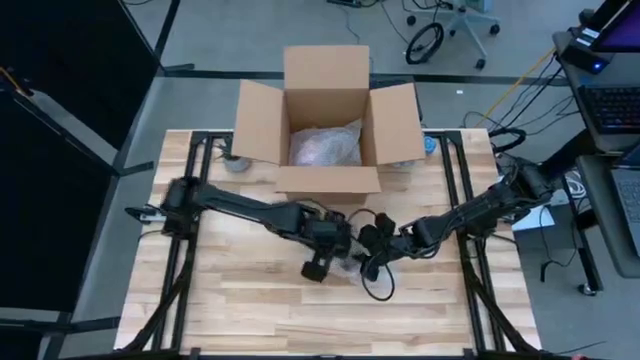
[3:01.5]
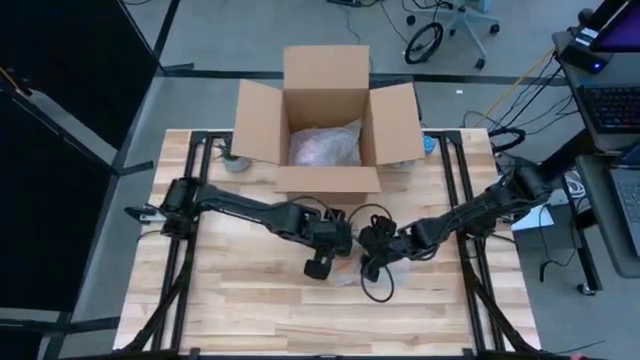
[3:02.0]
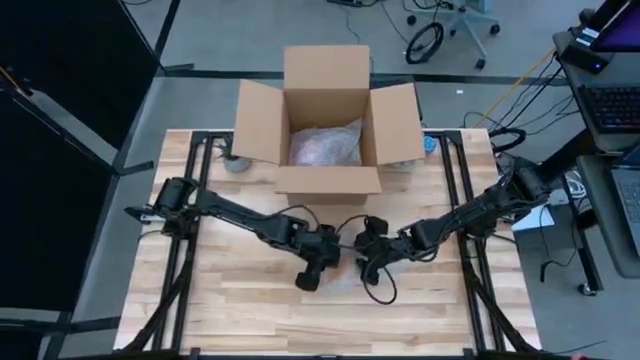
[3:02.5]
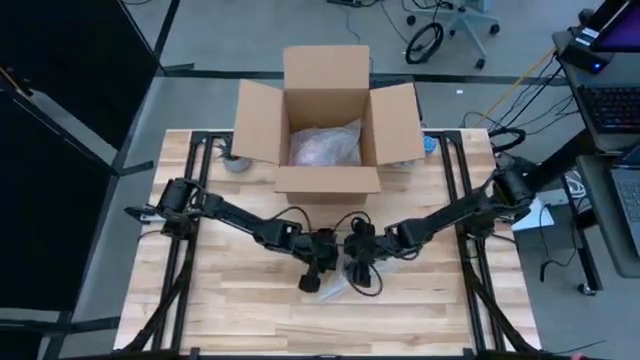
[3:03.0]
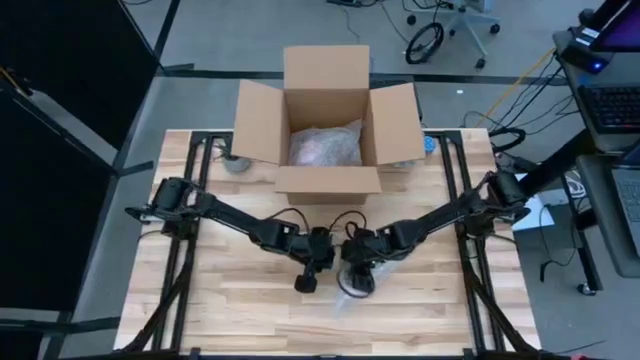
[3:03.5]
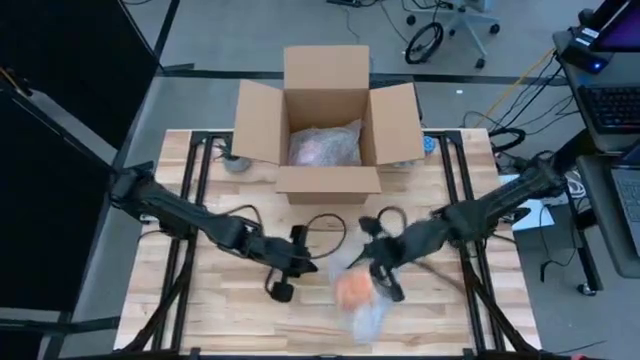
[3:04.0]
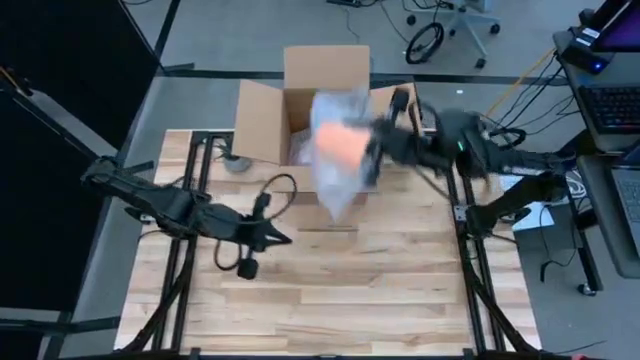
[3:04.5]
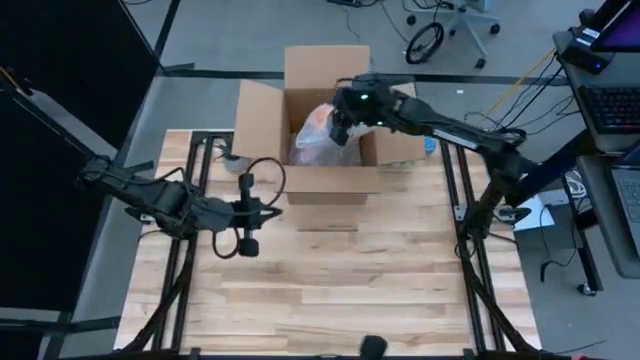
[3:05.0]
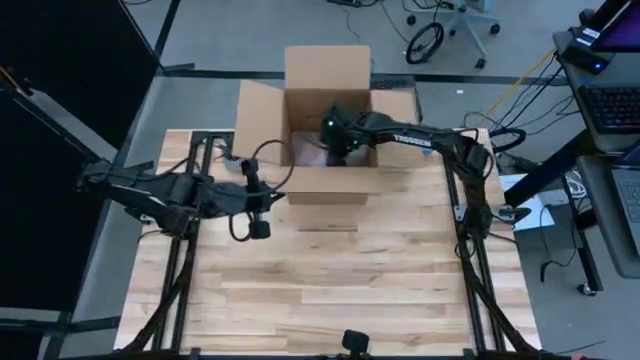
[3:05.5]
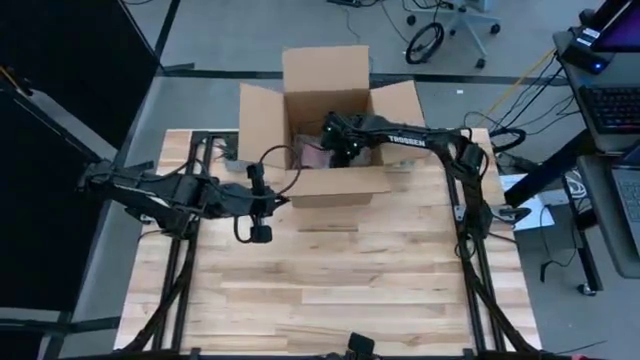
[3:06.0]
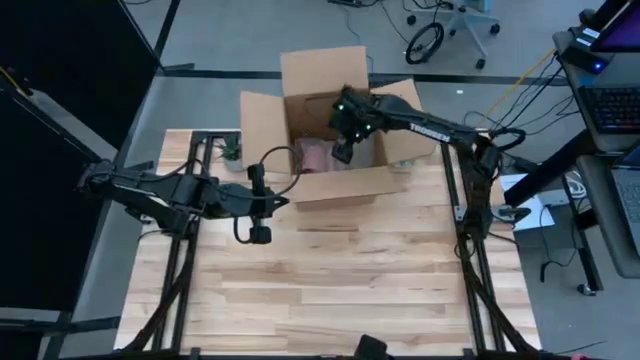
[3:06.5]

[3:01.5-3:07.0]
Task: wrap mug
Put the wrapped orange mug into the cardboard box

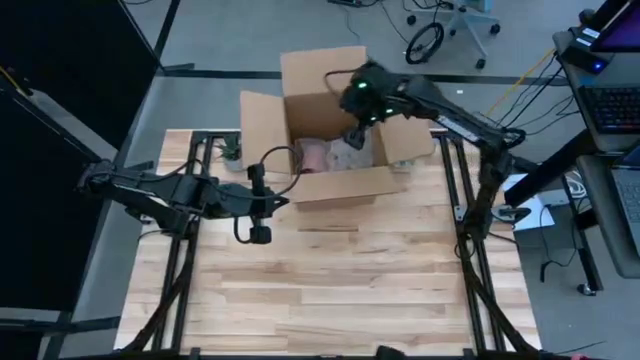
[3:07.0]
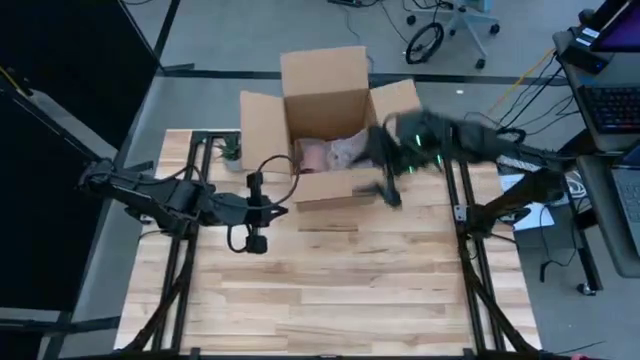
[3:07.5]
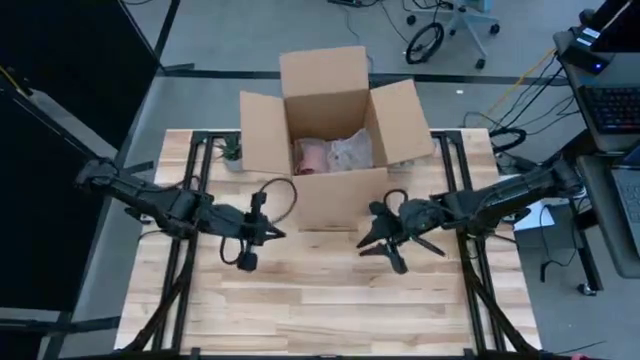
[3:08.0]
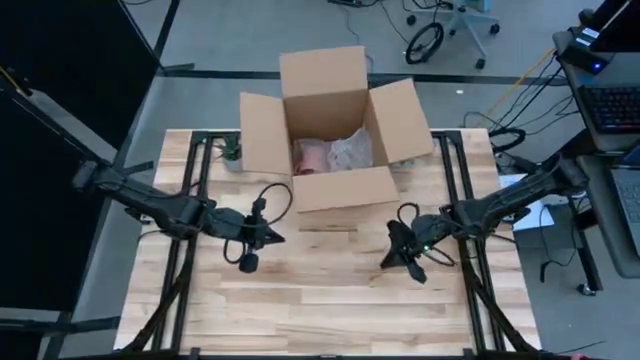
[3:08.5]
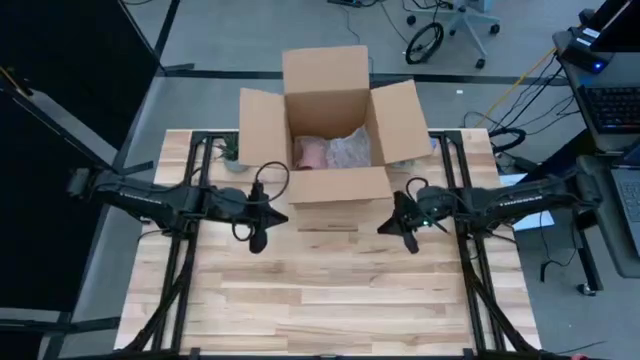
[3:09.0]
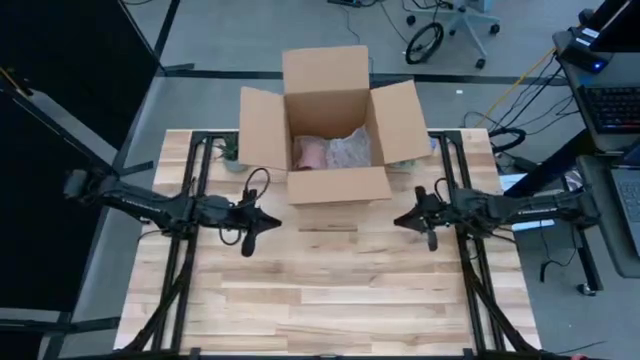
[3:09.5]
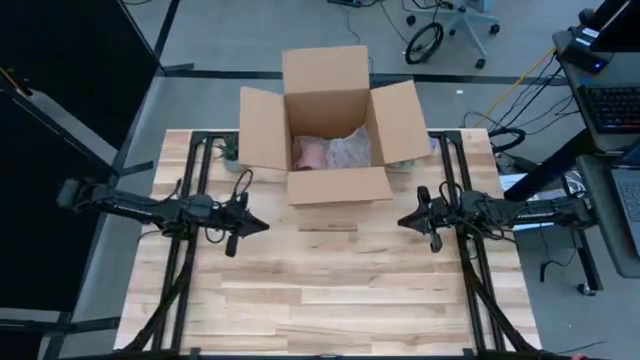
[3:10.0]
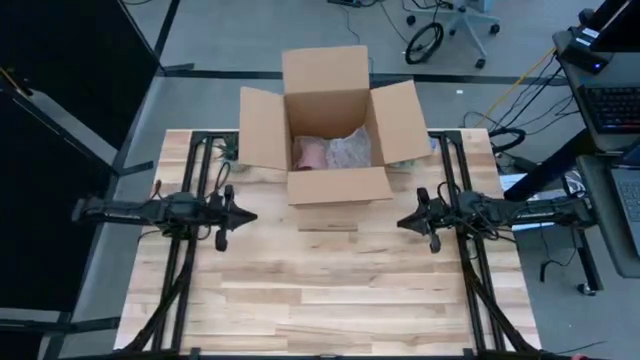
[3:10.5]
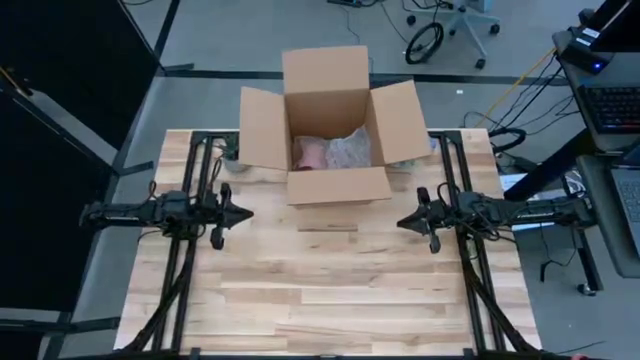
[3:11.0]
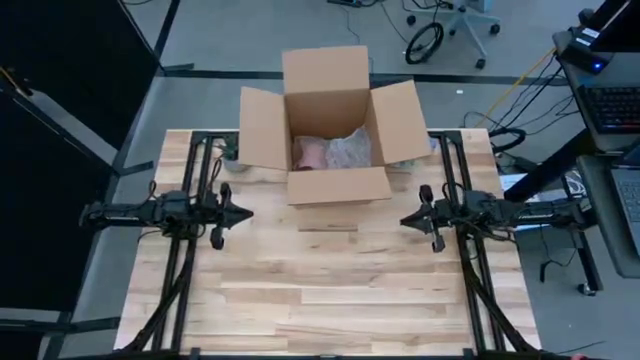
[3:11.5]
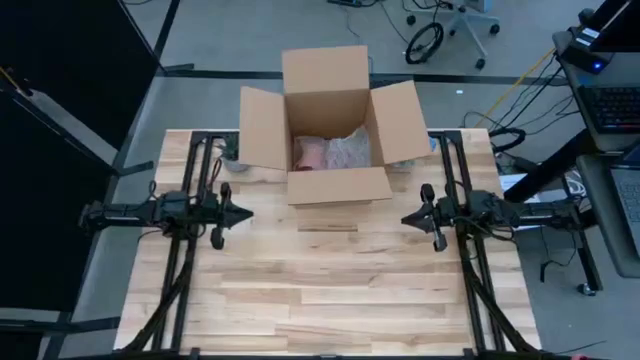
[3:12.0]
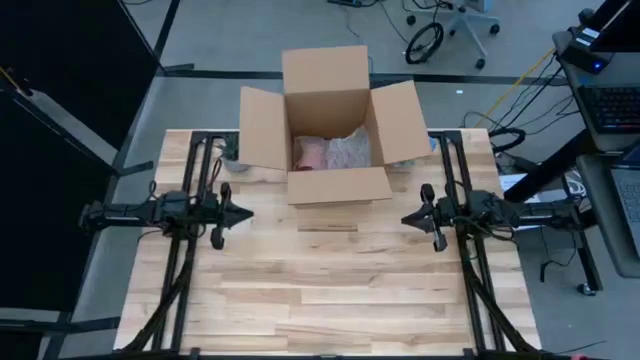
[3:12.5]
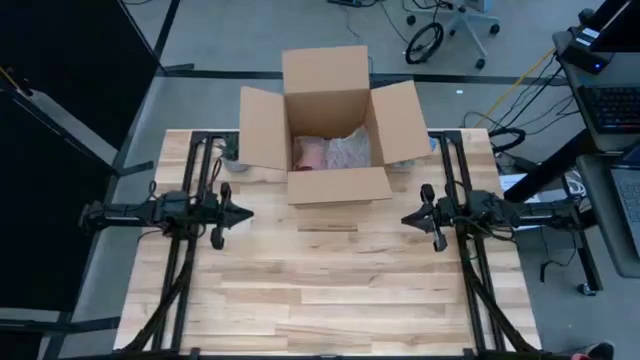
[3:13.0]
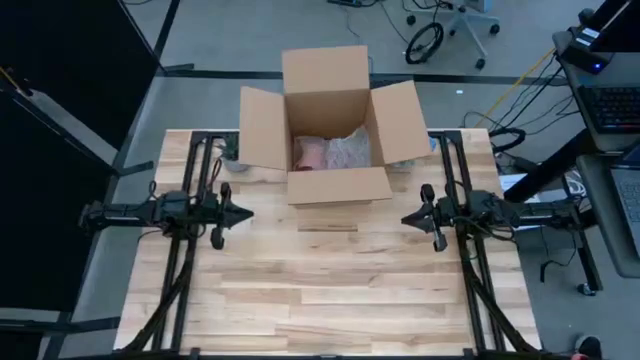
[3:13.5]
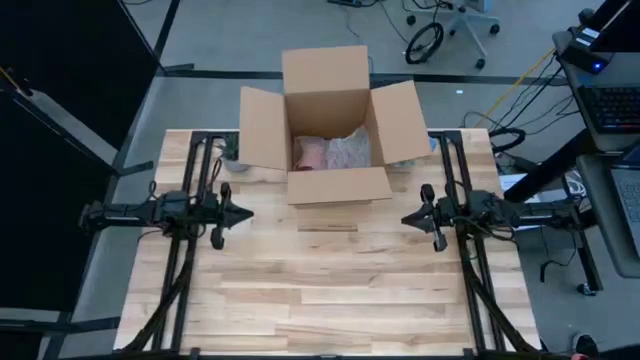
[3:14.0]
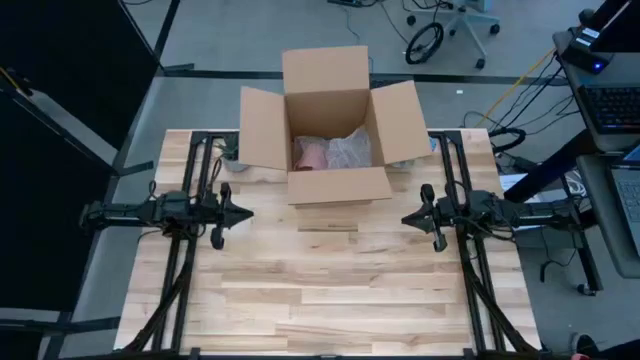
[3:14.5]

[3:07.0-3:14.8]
Return to Home Position

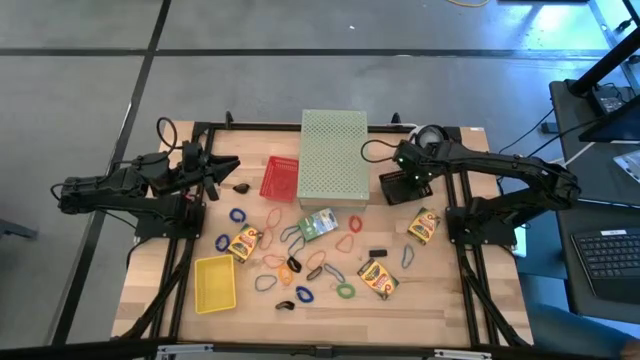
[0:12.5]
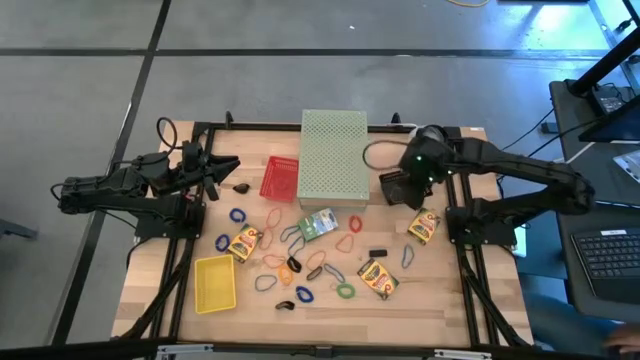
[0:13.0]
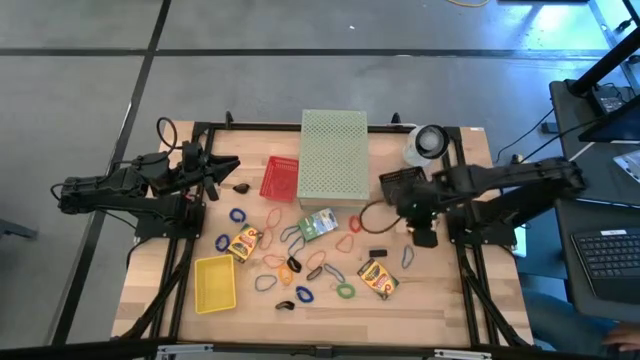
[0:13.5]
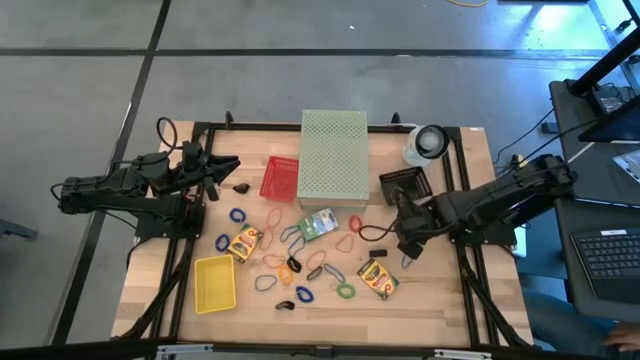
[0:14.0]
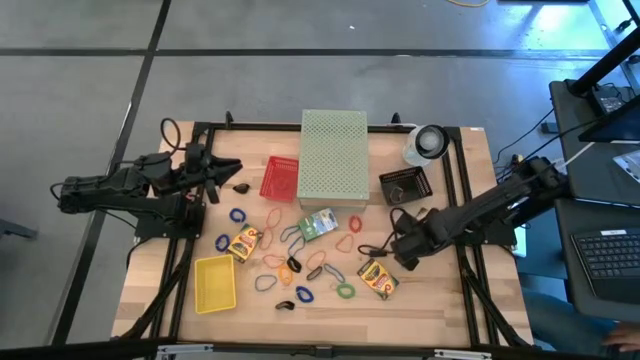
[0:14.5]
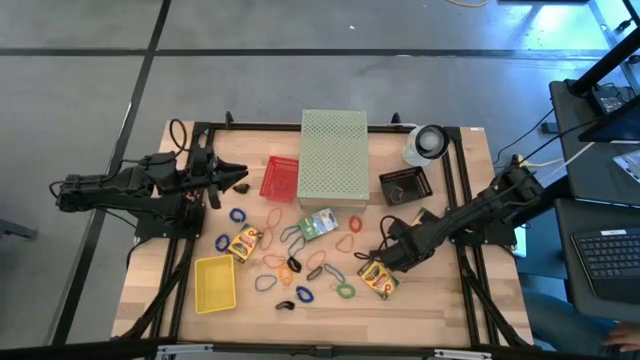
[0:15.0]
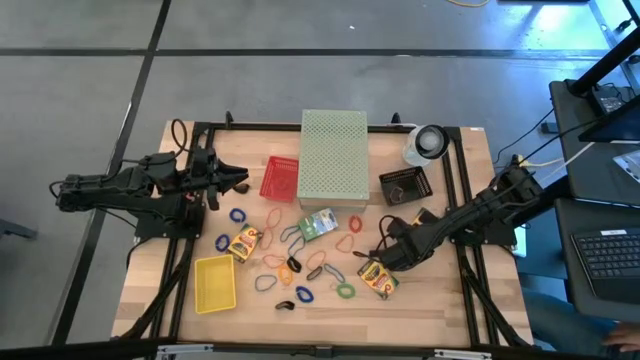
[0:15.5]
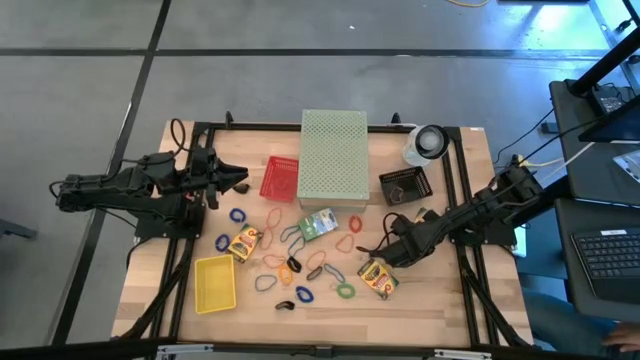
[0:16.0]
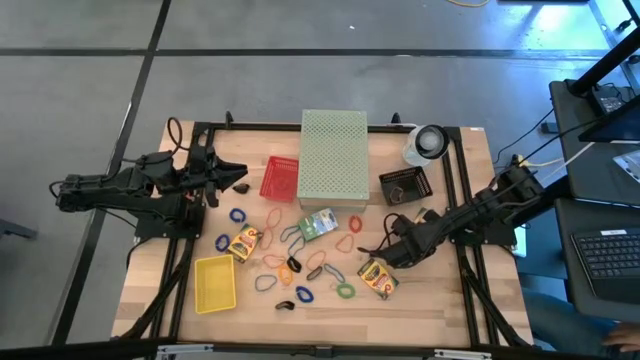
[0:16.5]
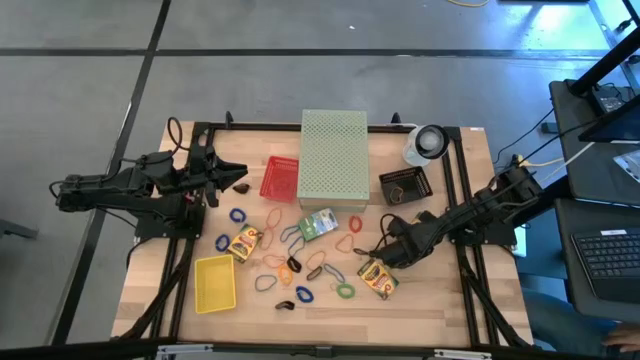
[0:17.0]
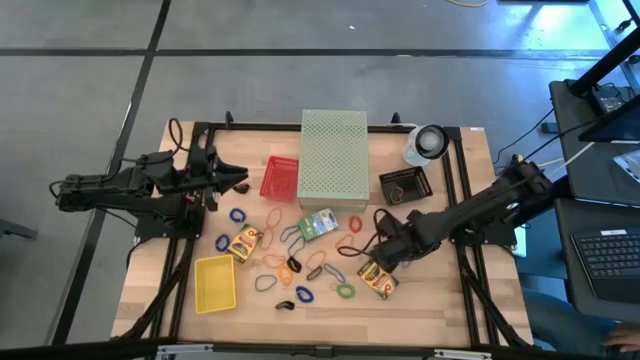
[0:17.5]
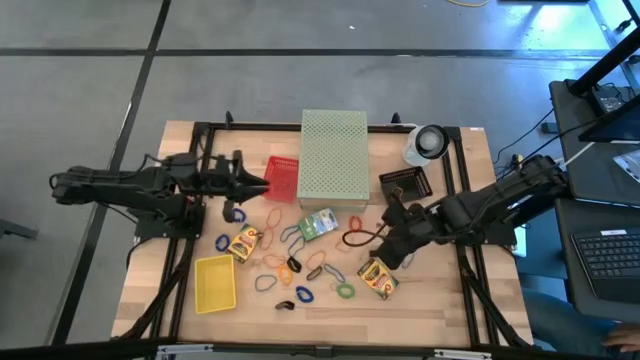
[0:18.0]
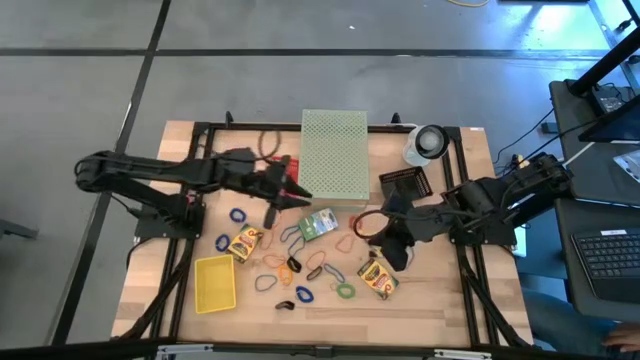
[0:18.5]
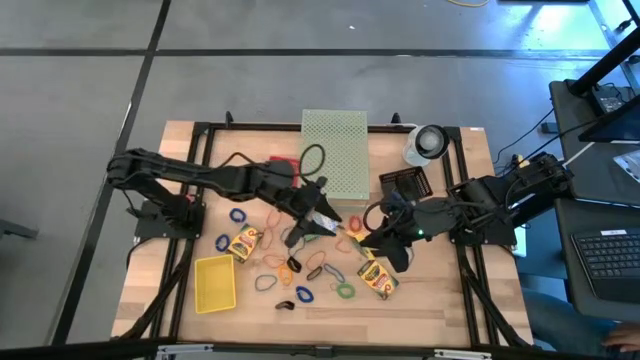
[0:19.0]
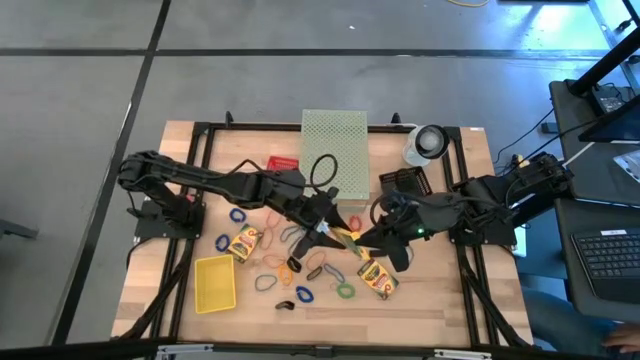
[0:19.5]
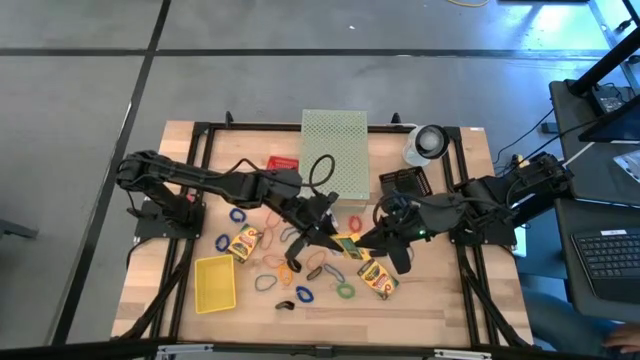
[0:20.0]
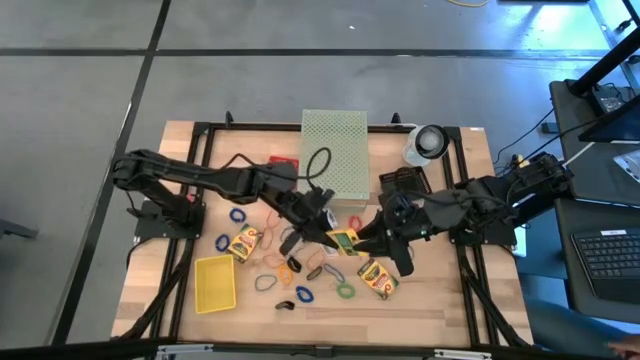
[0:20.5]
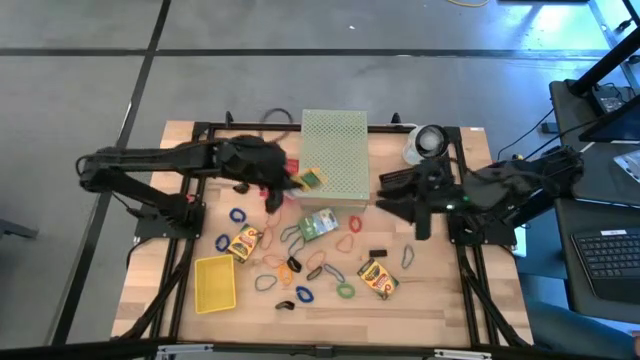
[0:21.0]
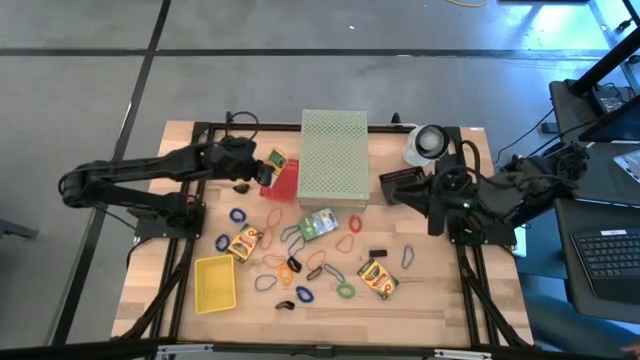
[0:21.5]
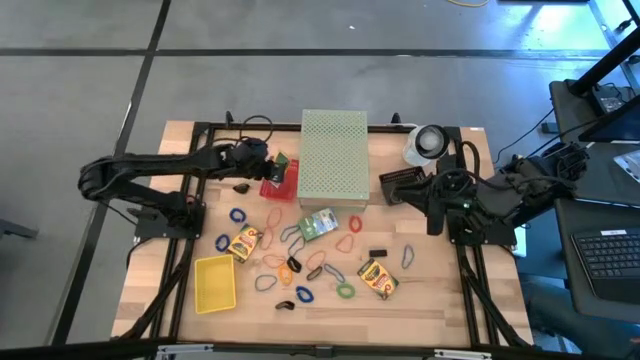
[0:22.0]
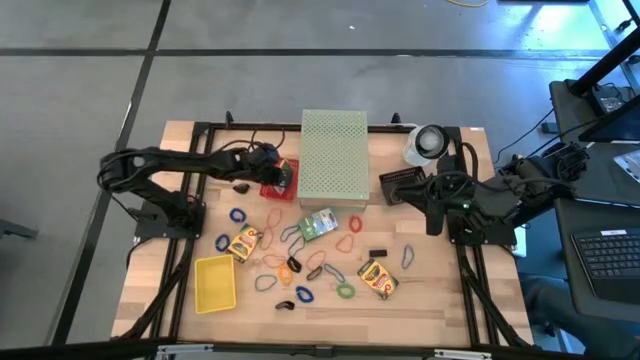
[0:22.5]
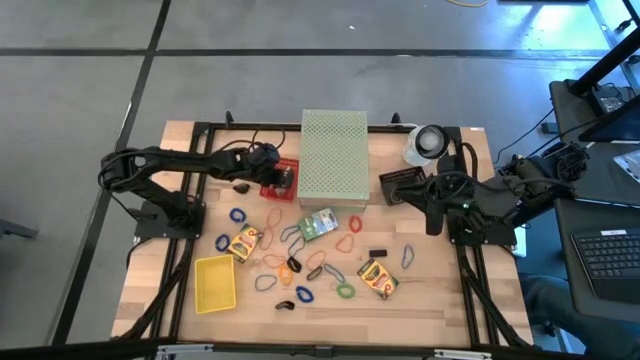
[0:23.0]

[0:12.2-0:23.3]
Task: Pick & Place Office Desk Supplies
Put the crayola box into the orange bin
